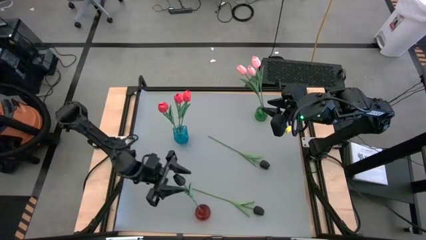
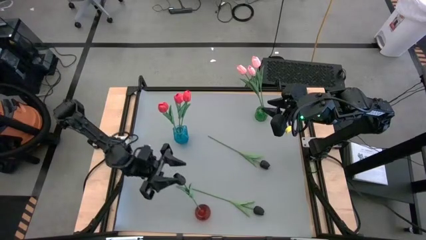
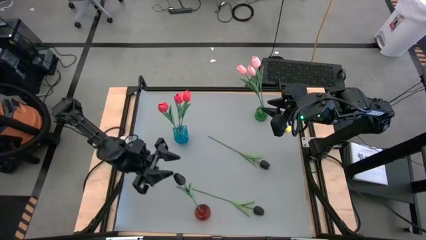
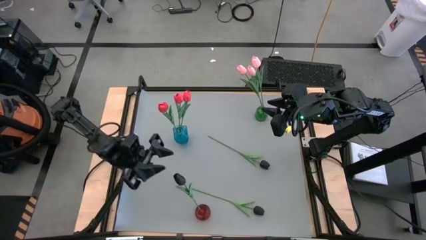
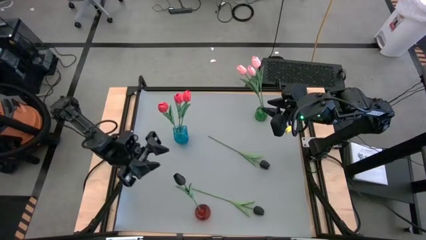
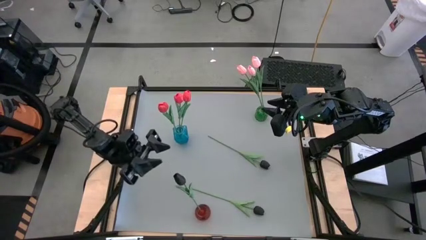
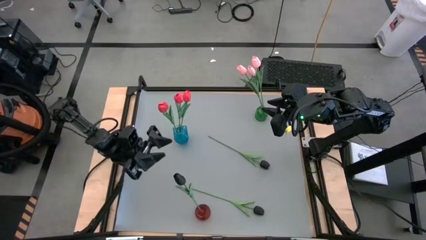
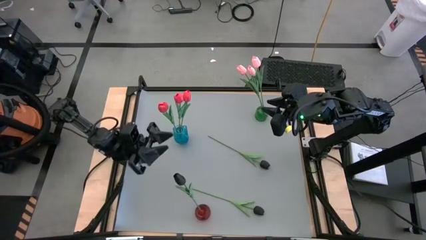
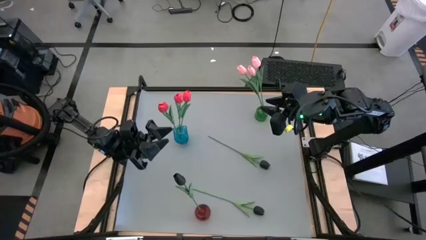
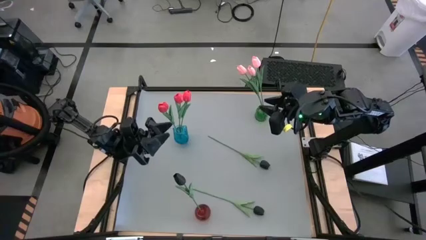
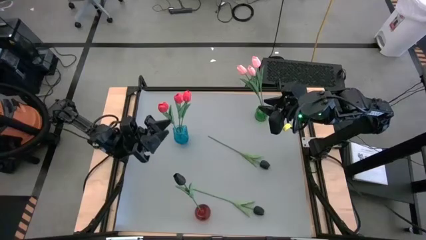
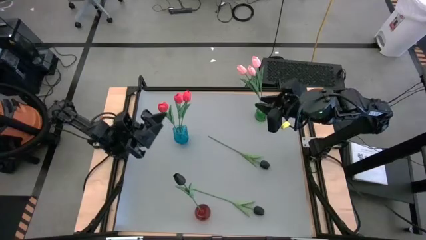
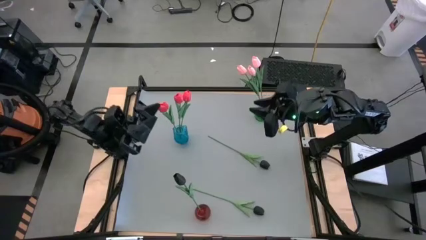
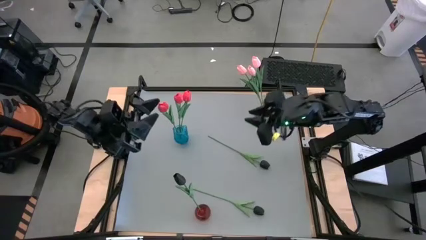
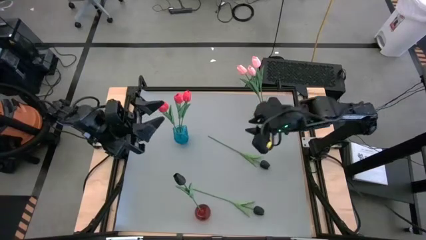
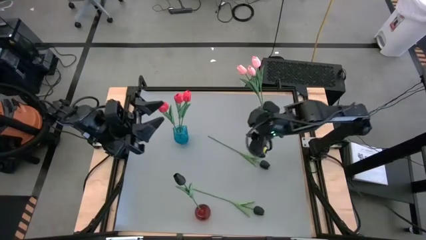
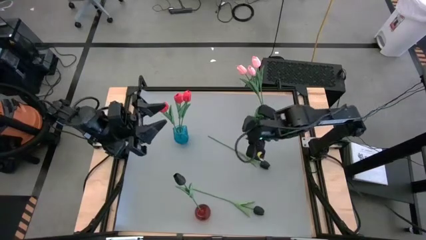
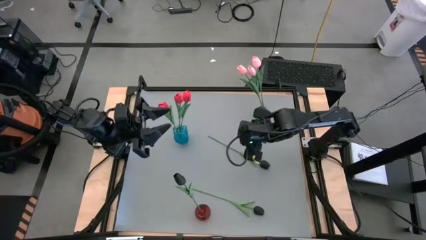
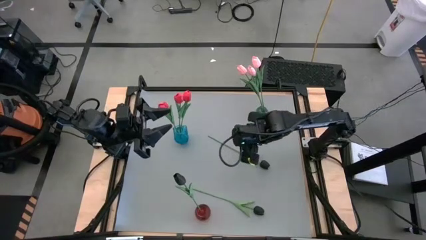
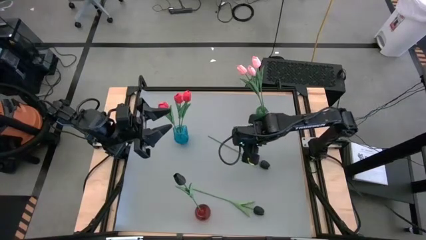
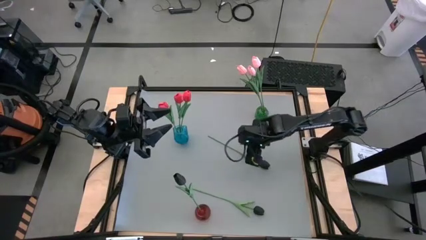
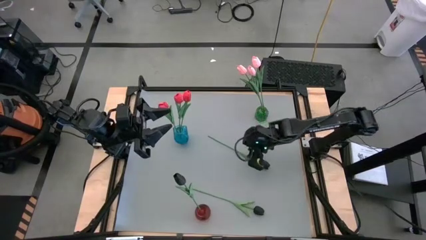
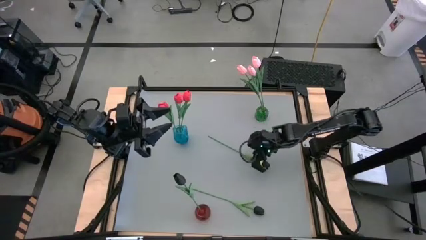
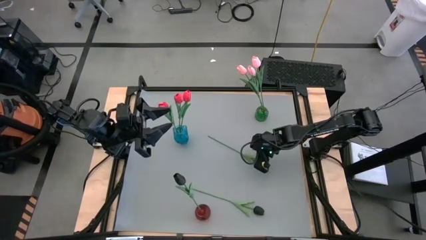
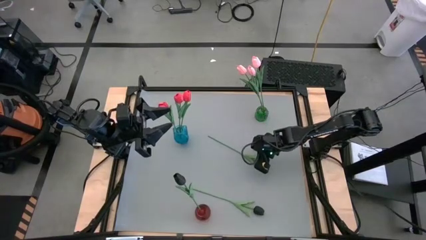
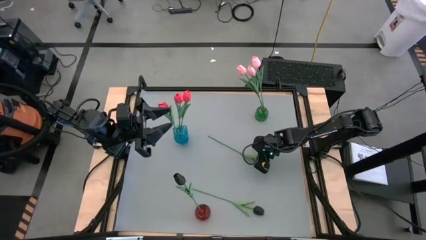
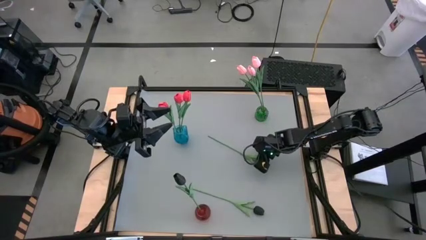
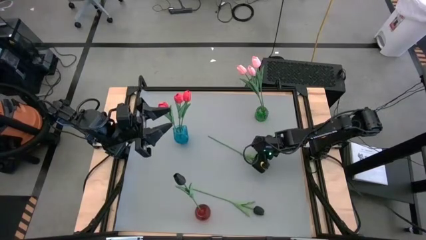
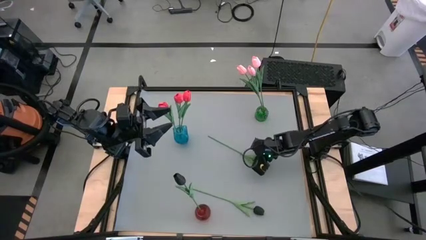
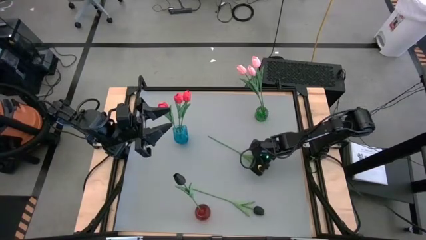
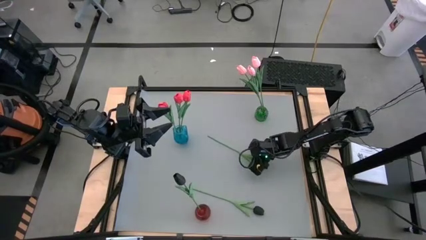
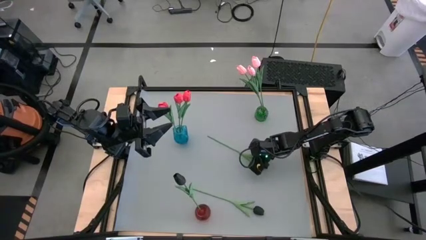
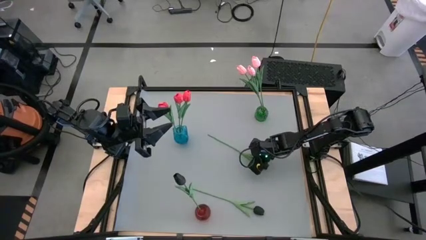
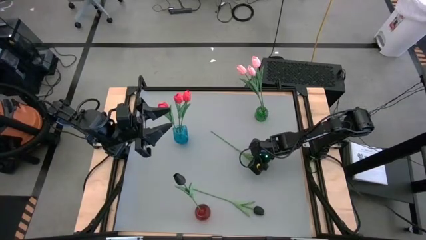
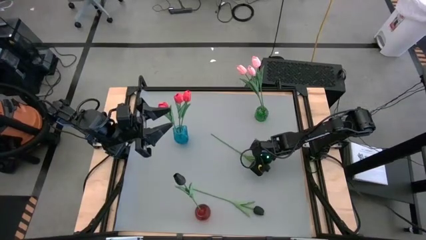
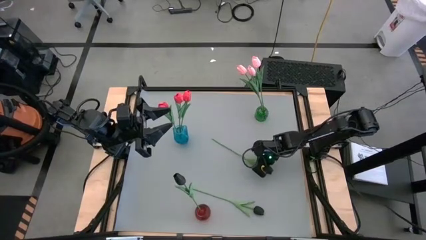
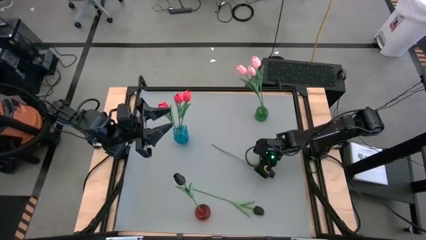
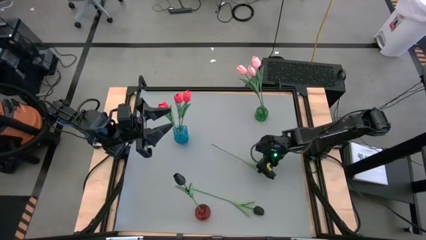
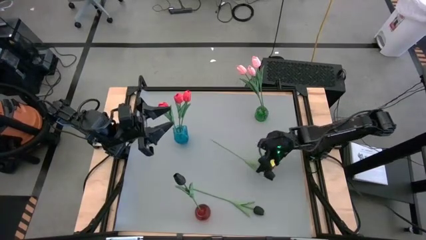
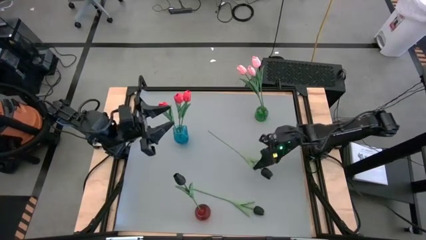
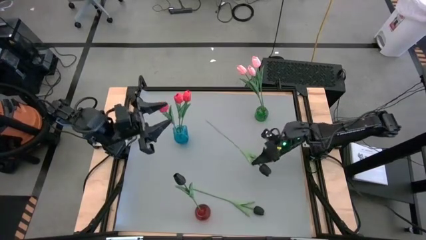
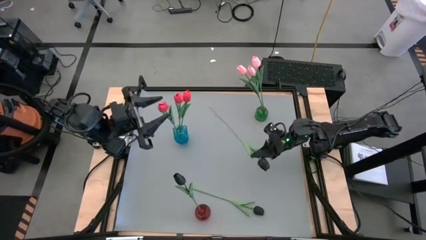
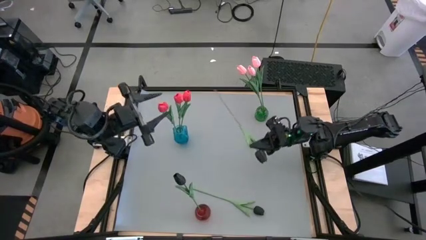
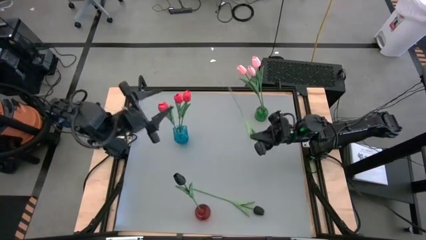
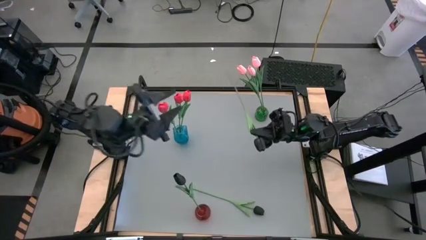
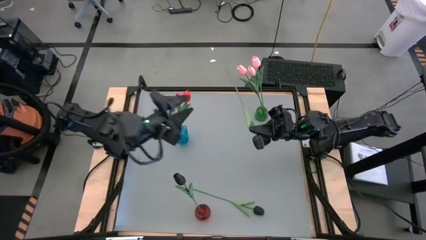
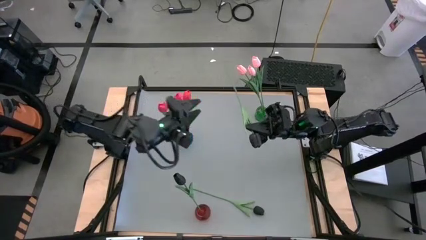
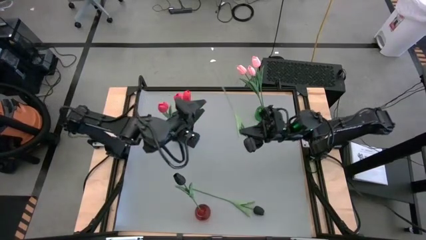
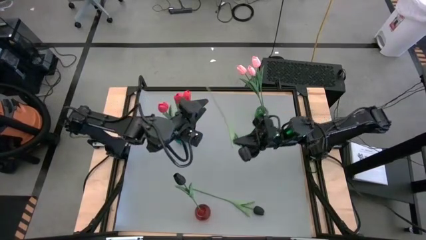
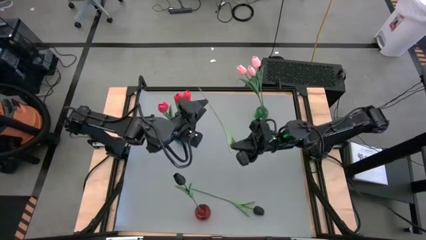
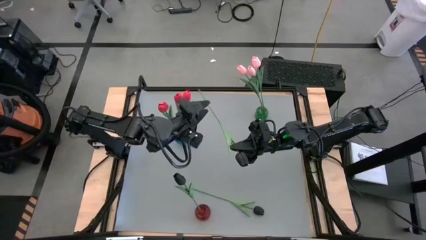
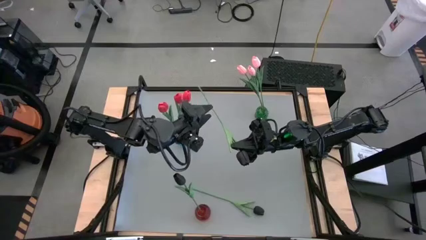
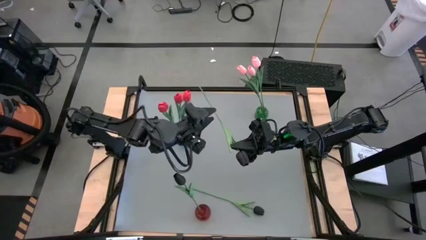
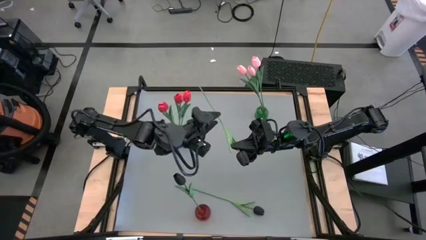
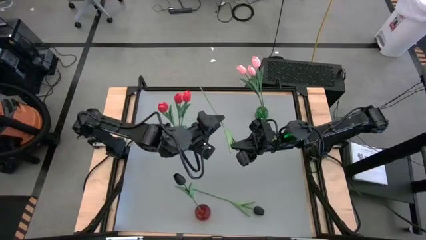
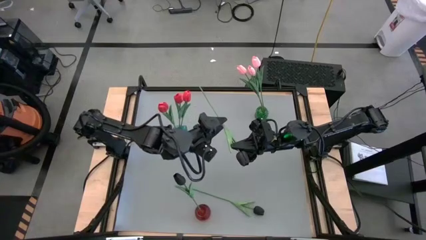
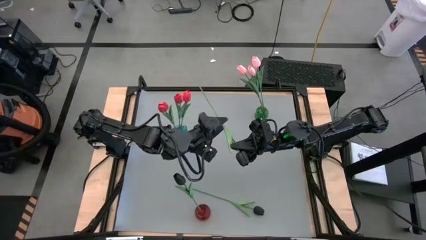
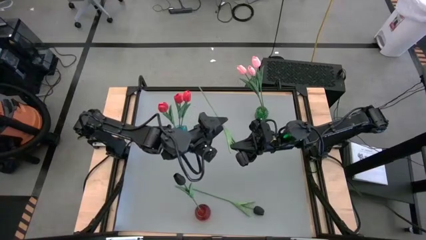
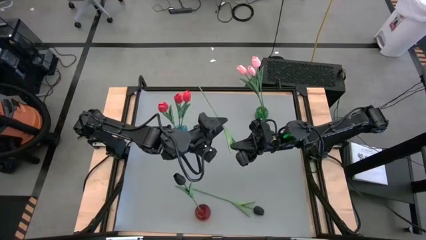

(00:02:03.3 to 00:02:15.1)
Task: Sort flowers into vase by color
Put the top black flower into the red vase

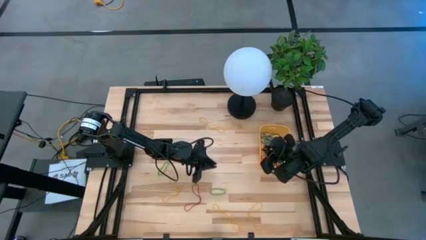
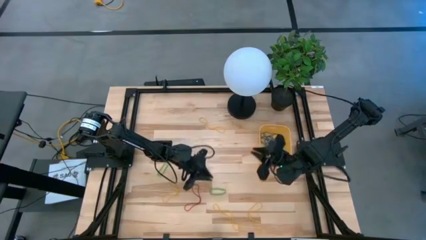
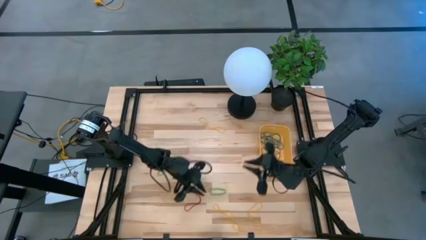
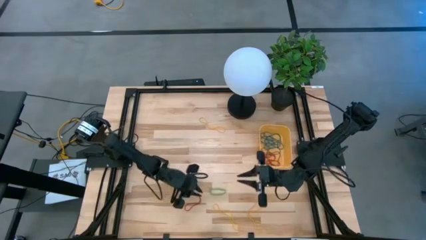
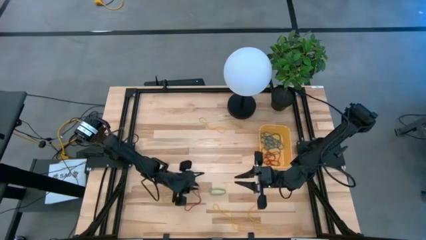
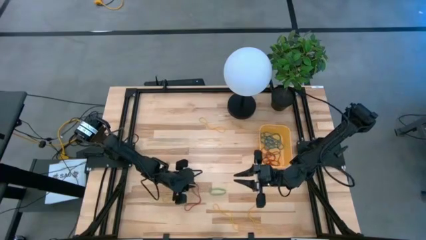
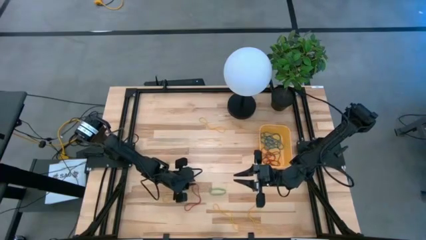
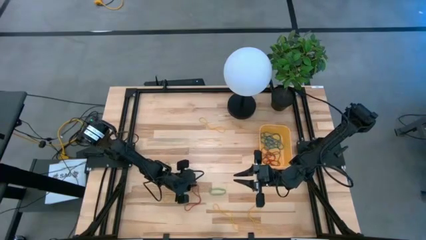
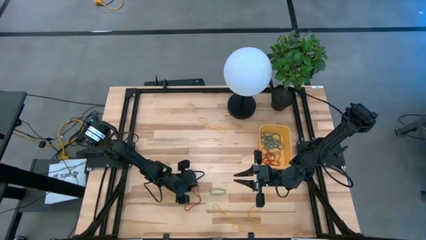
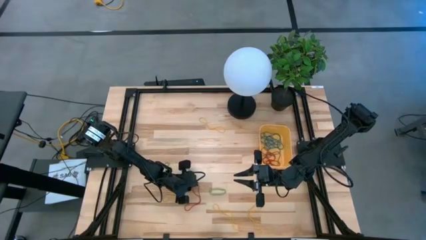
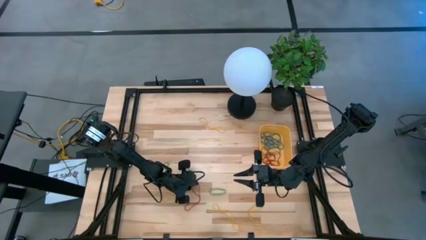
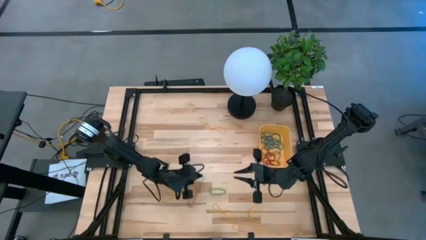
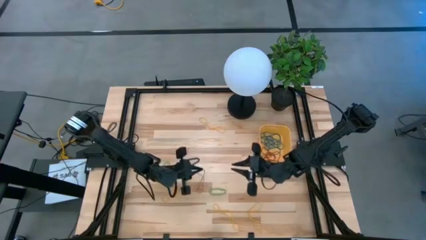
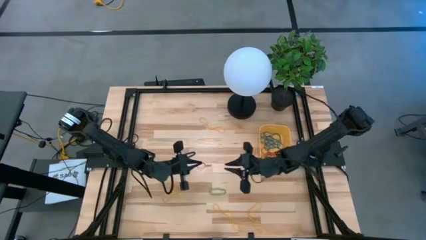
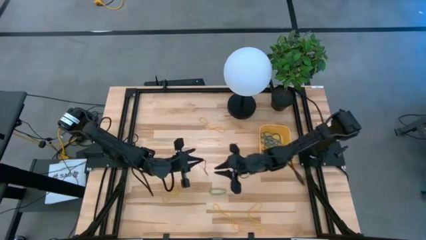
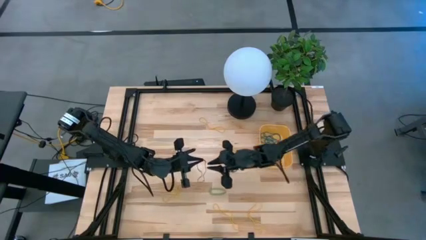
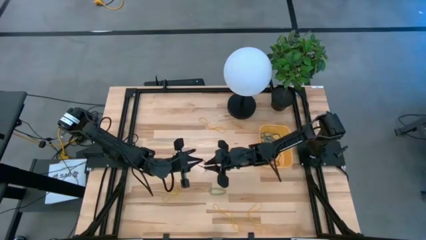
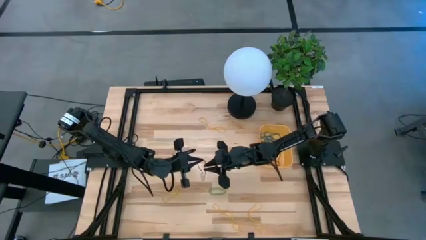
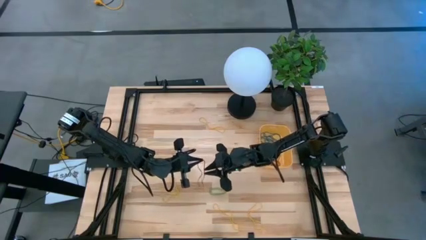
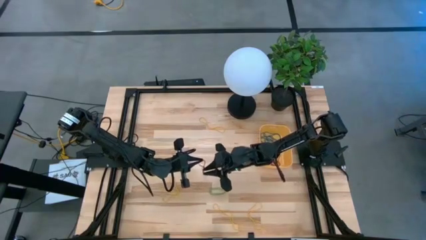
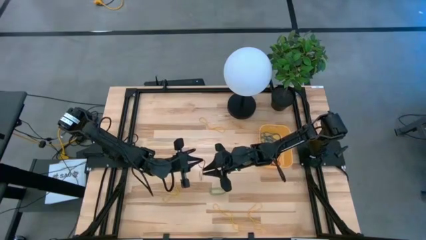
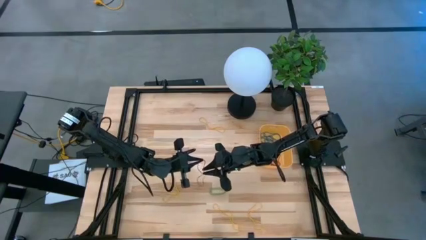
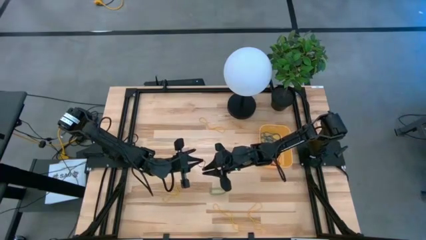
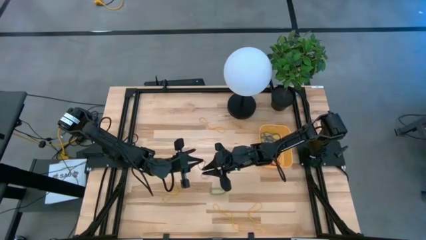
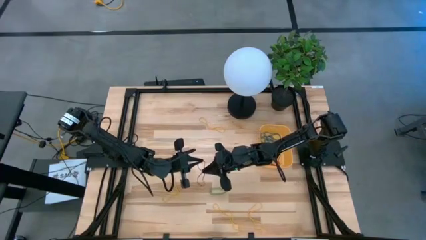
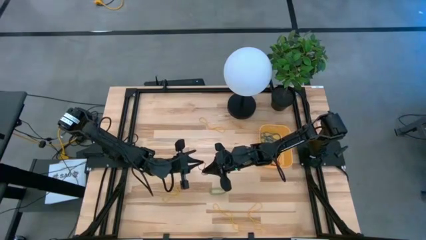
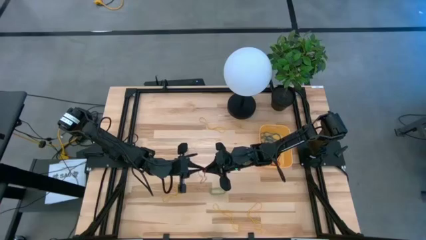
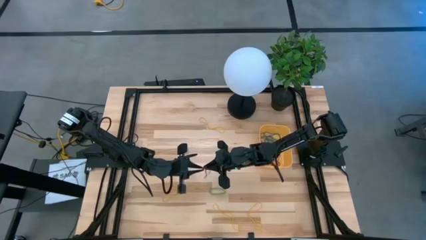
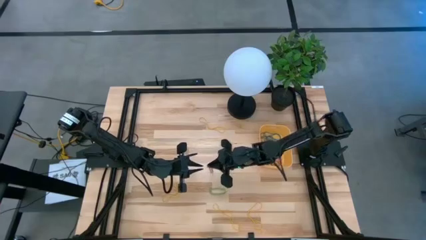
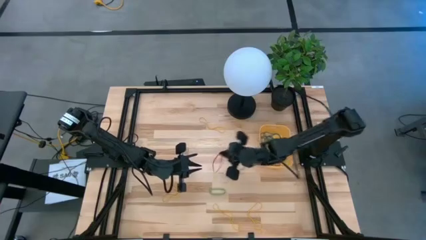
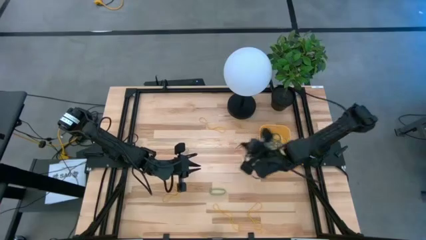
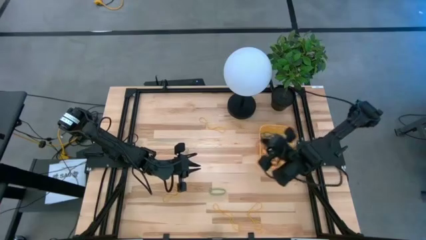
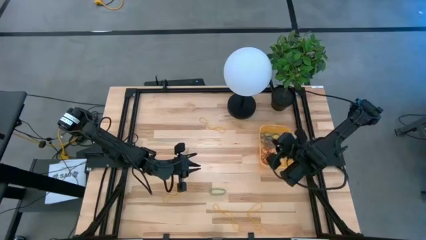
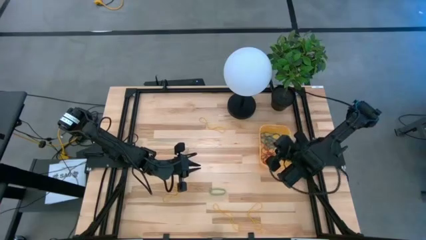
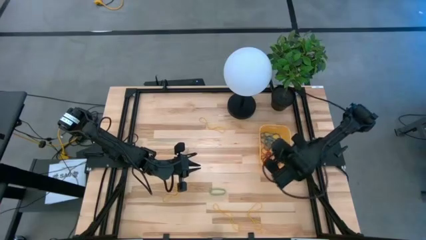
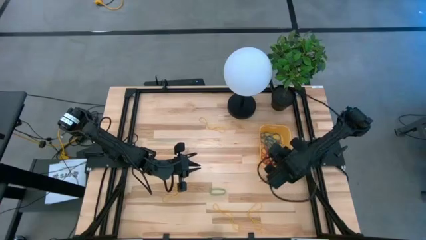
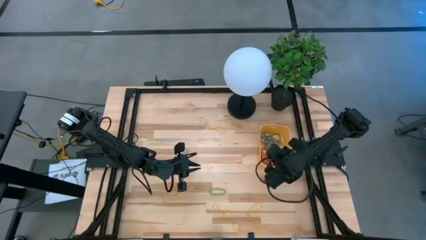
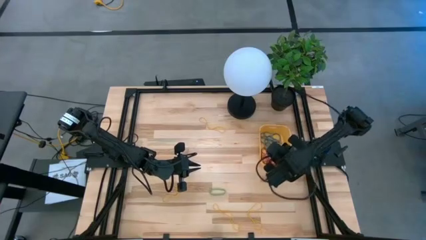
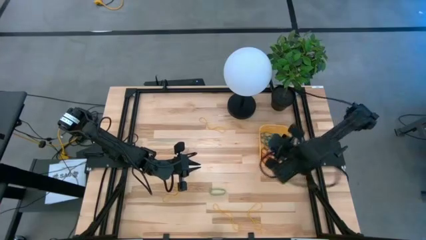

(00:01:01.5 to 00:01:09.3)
Task: Pick and place items into bin
Put the red rubber band into the bin
